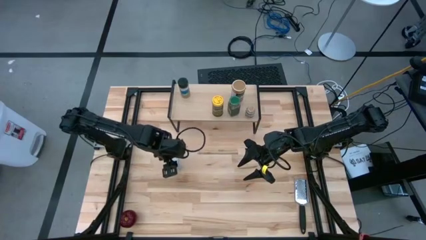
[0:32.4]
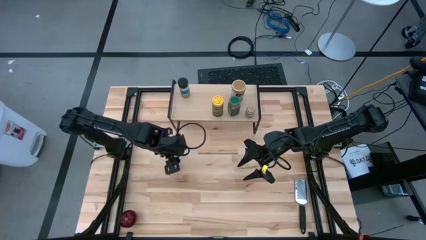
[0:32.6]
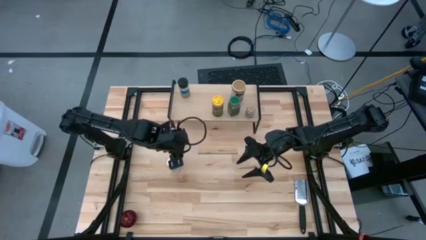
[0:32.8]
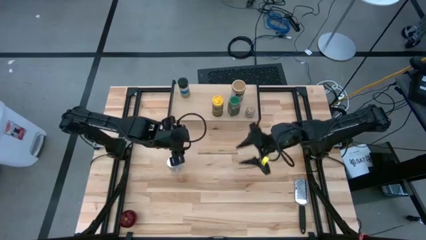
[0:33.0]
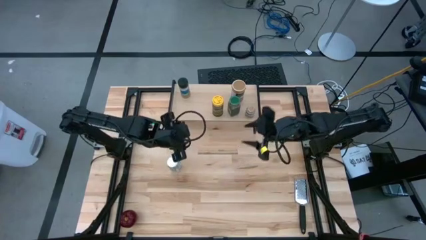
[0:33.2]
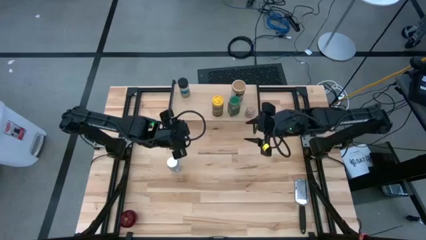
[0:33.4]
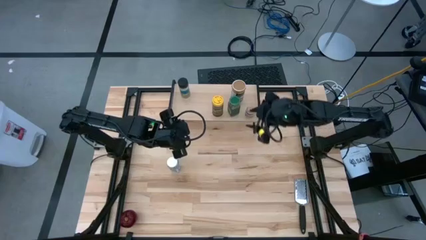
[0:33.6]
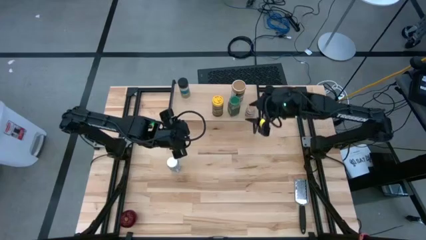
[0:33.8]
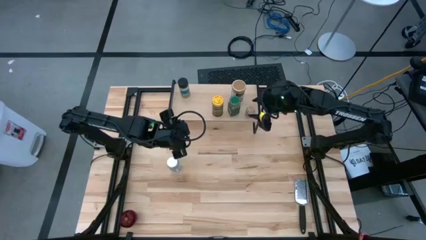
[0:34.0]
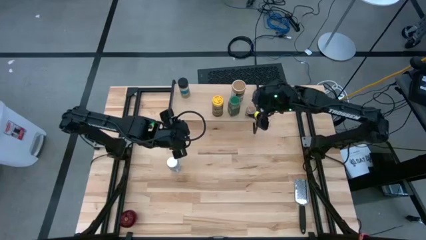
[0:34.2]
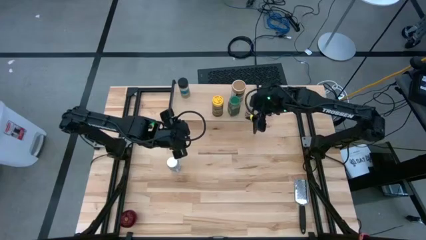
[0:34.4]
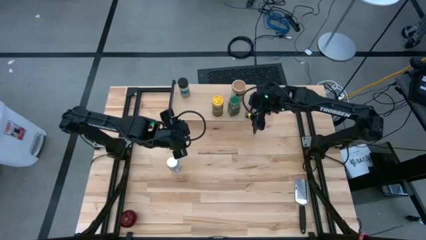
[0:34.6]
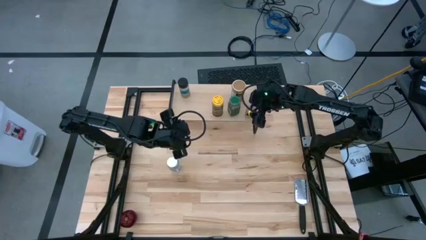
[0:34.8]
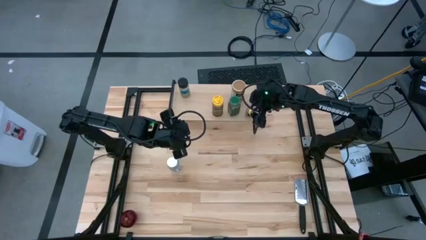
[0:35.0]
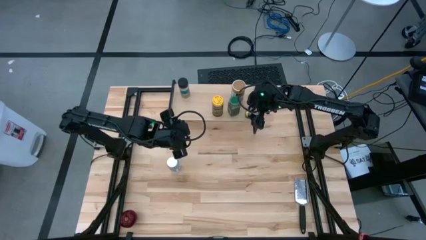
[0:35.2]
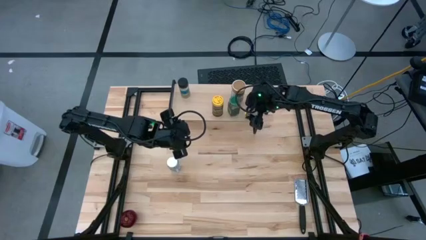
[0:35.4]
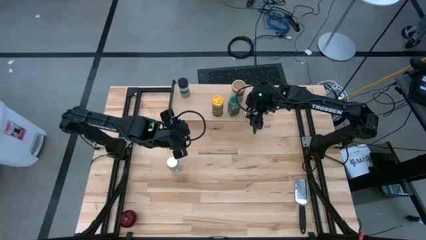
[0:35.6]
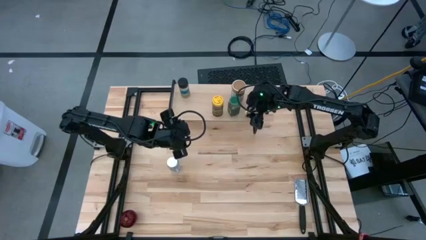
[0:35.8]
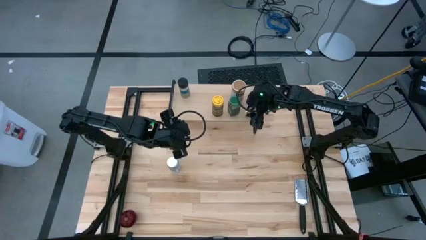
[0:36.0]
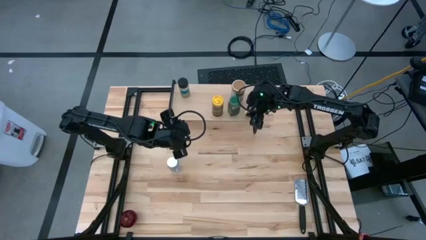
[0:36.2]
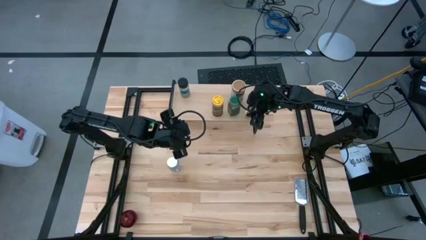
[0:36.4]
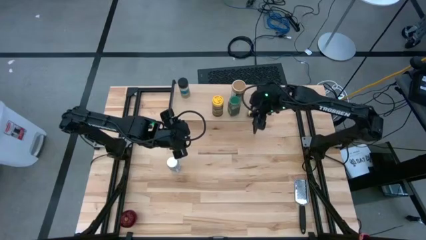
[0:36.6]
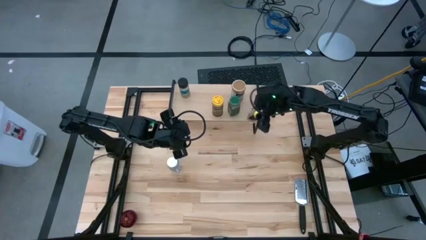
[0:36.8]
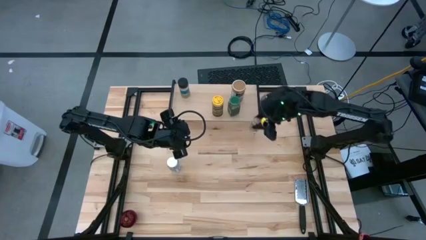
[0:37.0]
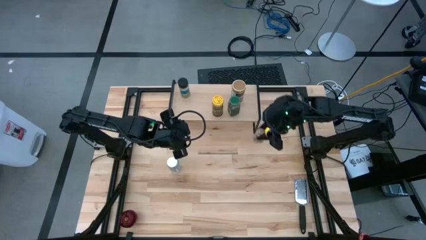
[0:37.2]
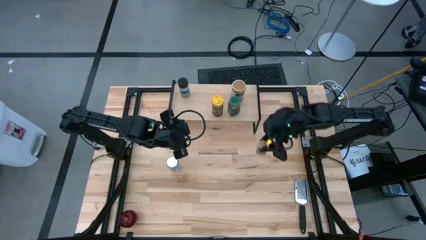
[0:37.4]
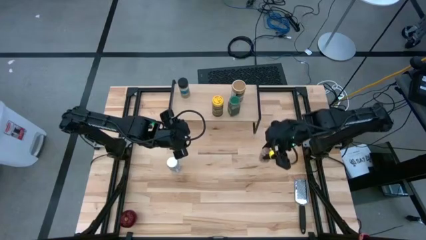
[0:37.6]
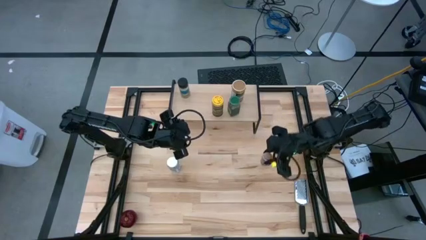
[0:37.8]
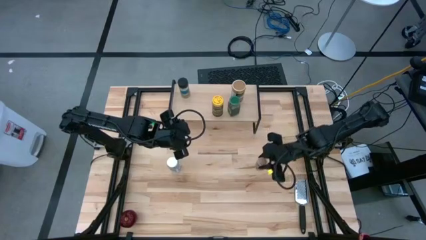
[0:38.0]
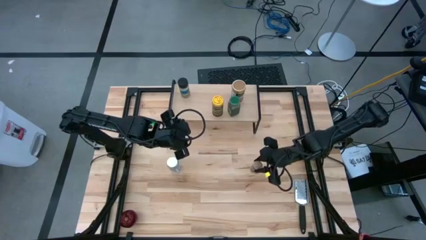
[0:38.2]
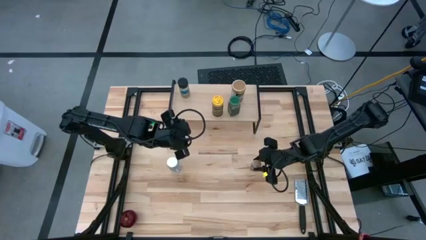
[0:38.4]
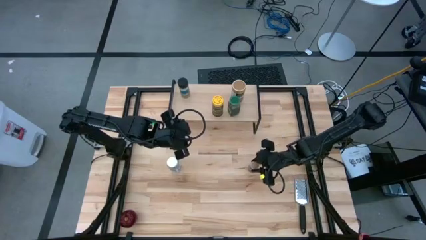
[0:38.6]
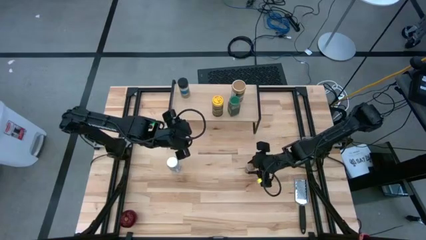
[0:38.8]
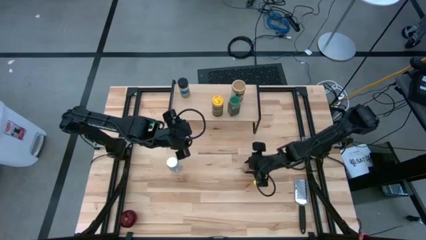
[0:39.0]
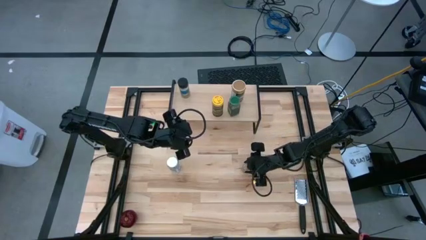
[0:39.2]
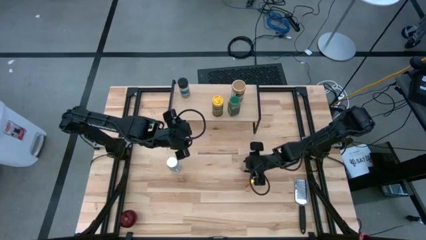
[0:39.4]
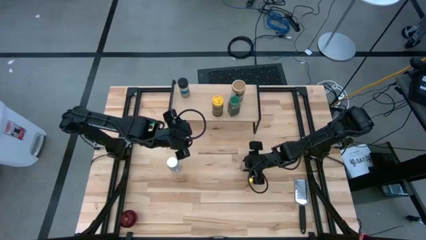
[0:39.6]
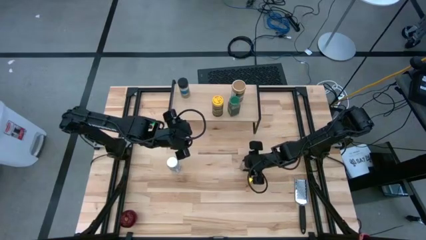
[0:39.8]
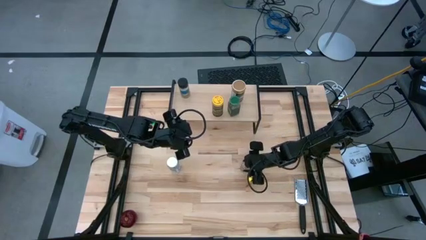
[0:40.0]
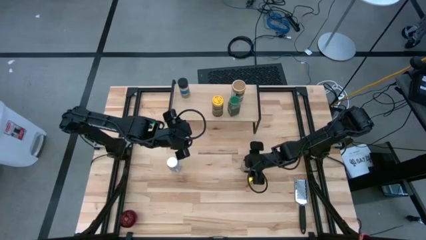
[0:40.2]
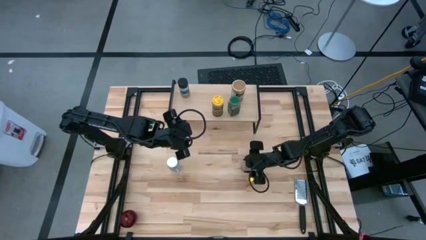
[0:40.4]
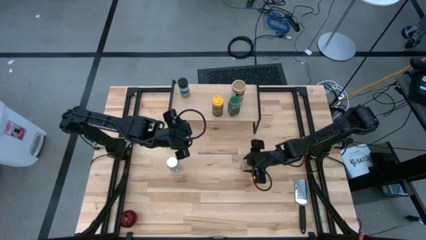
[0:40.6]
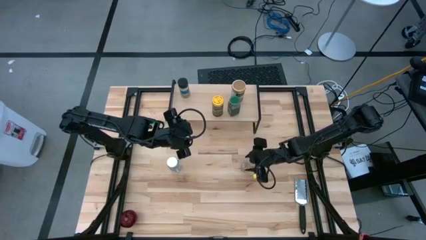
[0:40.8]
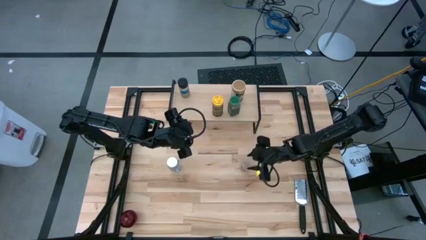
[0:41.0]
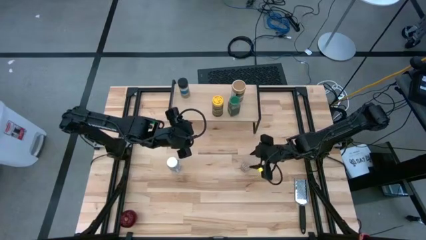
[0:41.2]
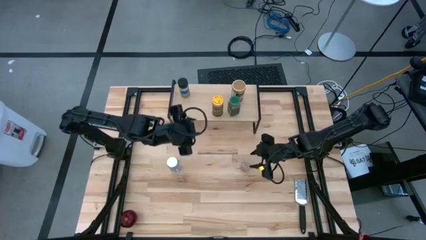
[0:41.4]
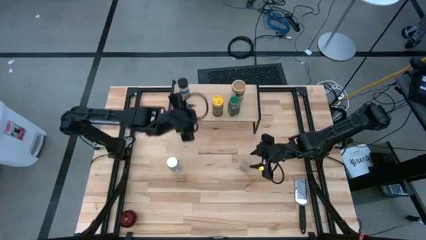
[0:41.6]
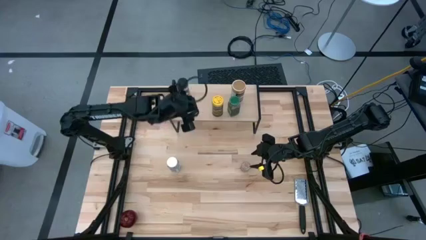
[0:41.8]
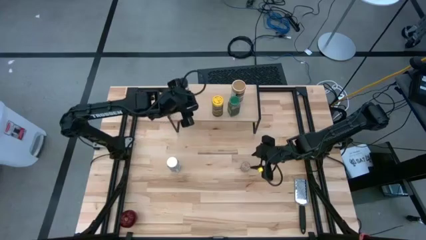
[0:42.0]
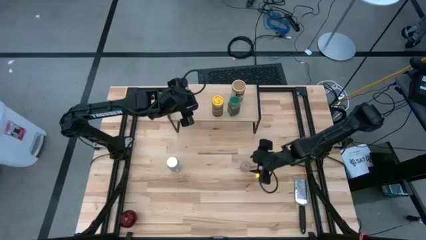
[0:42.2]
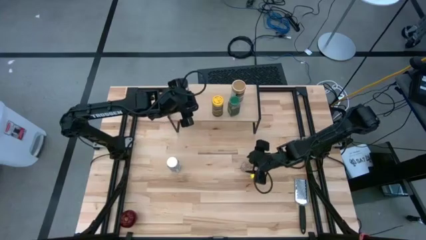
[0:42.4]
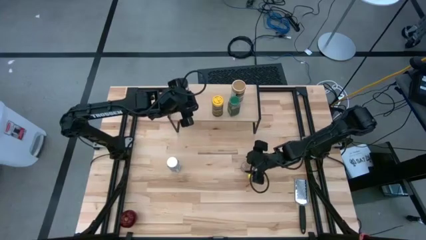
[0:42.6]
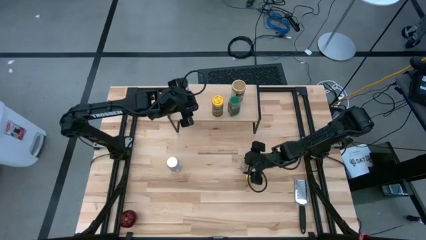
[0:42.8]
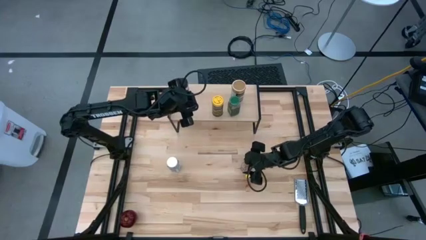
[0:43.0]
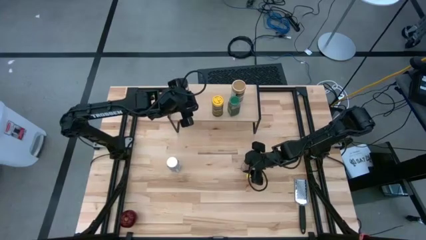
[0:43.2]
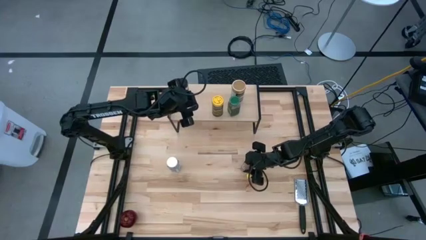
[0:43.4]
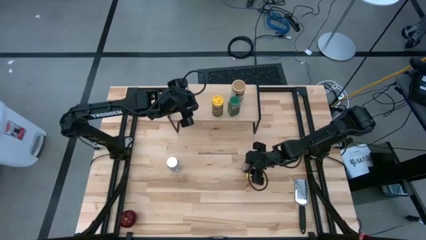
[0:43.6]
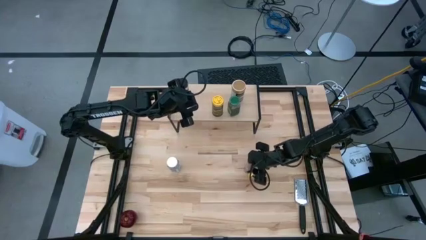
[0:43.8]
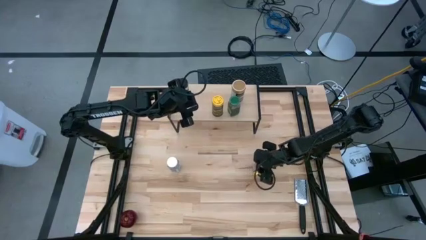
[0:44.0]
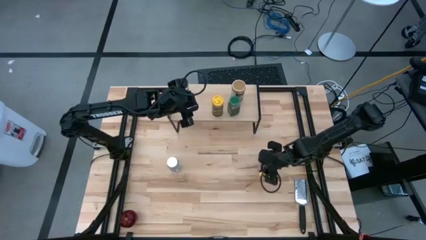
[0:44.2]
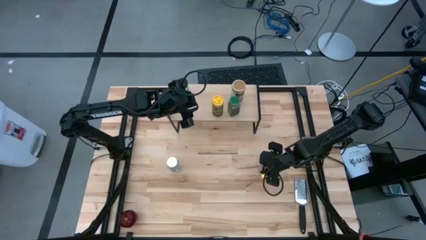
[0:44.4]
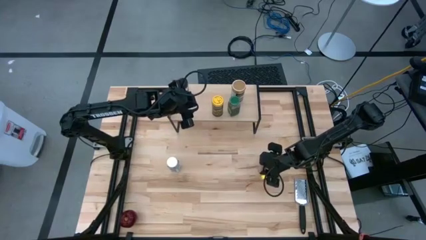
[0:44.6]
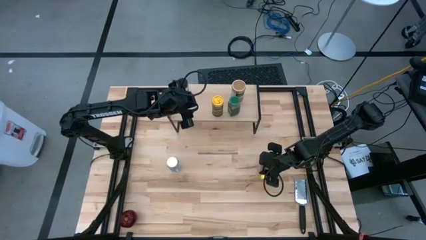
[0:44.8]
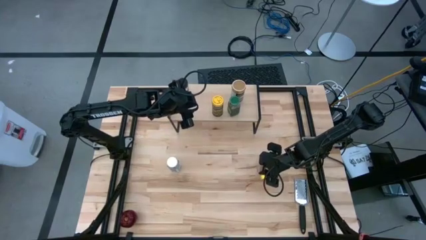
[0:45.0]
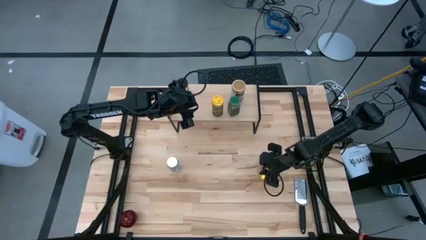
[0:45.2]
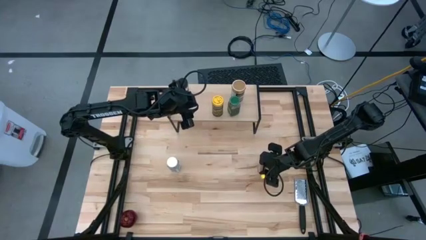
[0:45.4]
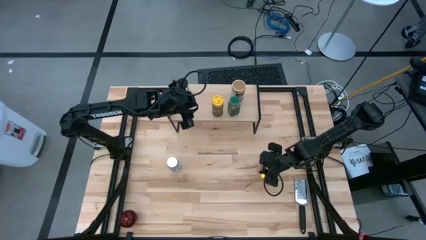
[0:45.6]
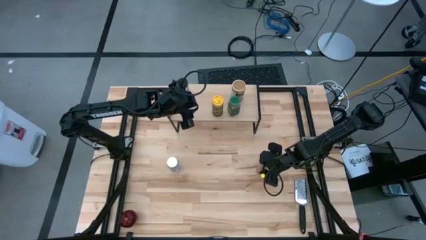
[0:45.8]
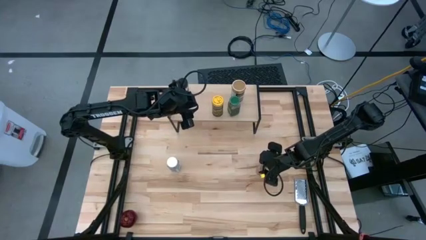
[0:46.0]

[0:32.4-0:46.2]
Task: Shelf spices
Remove the transparent seasoning bottle from the shelf
